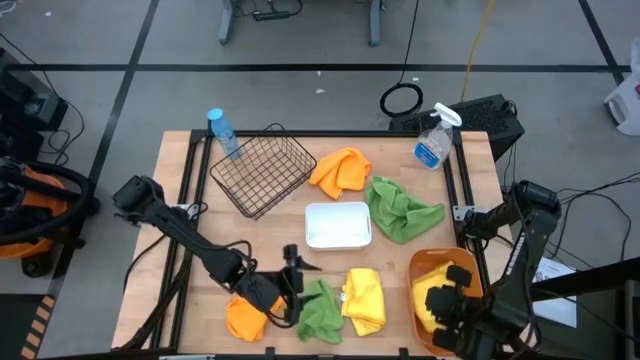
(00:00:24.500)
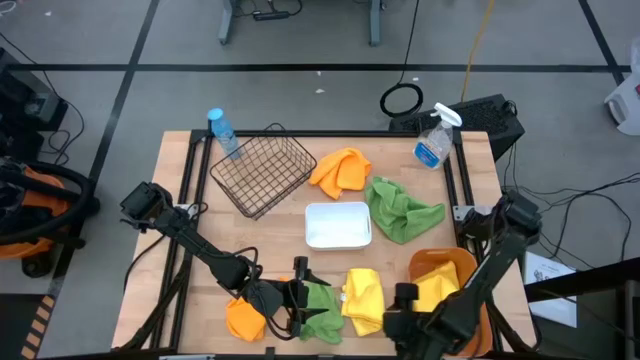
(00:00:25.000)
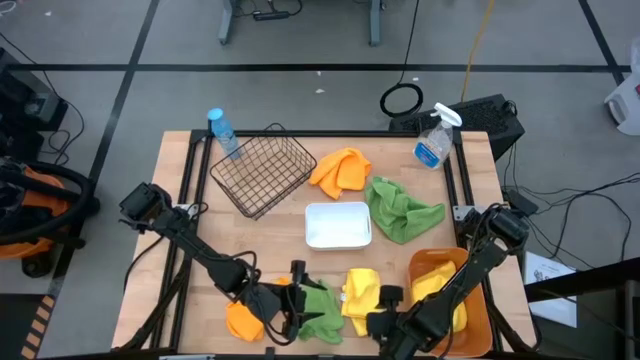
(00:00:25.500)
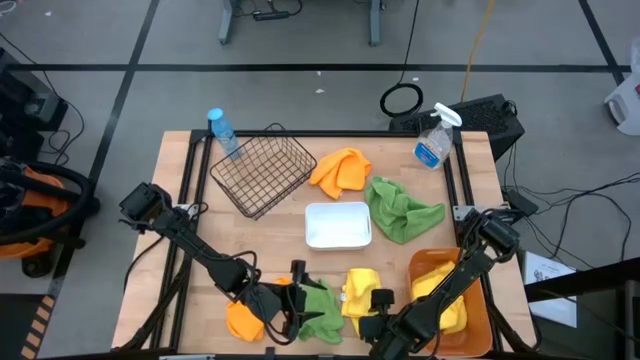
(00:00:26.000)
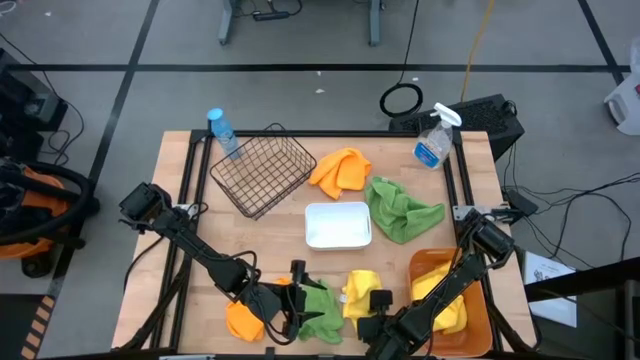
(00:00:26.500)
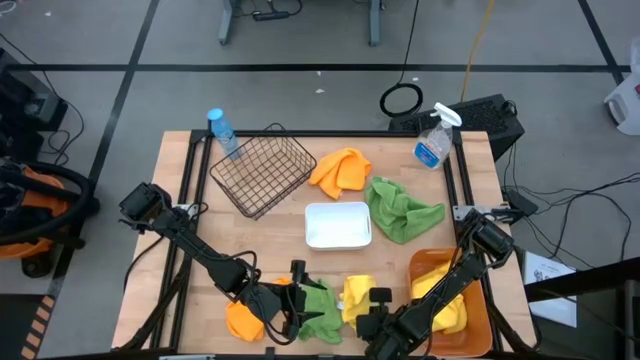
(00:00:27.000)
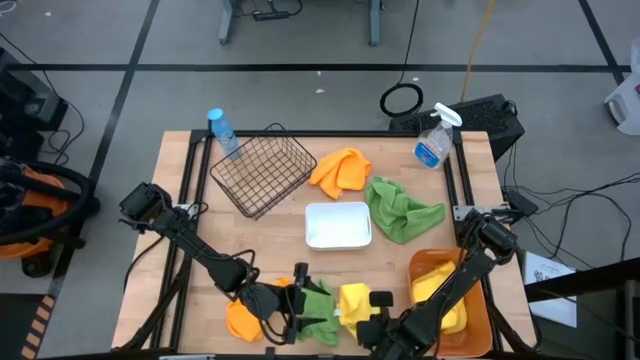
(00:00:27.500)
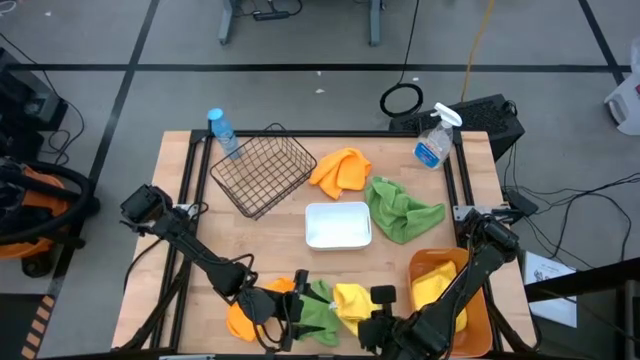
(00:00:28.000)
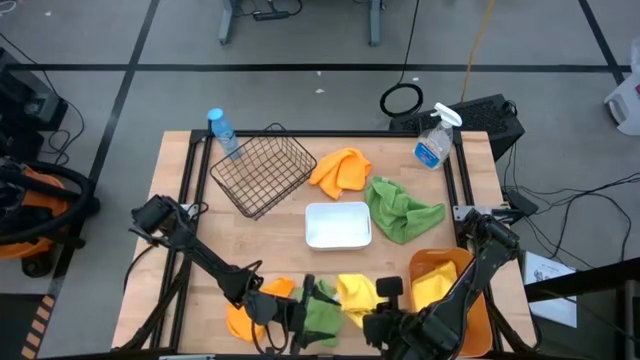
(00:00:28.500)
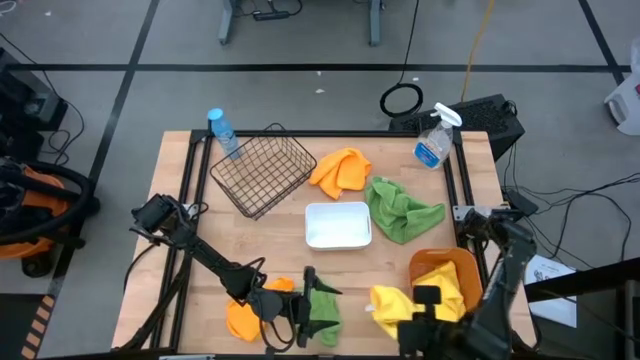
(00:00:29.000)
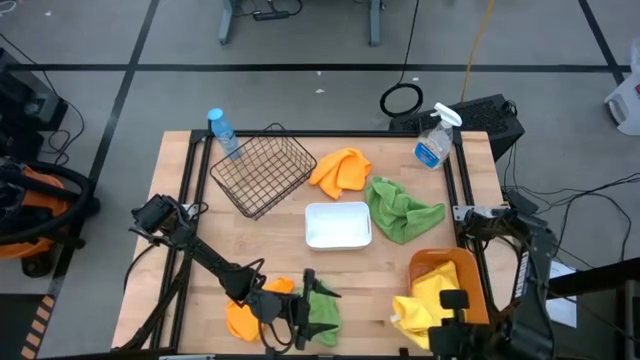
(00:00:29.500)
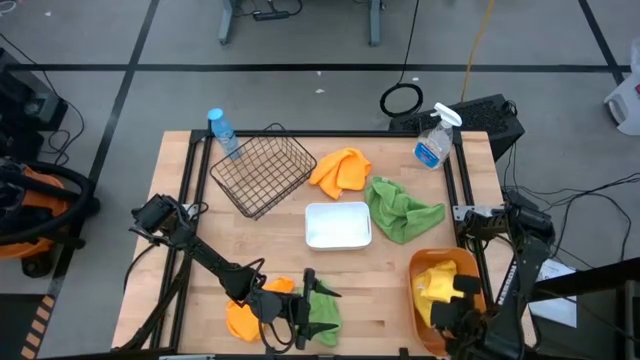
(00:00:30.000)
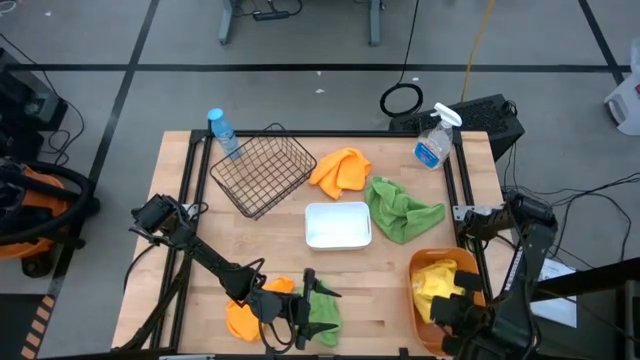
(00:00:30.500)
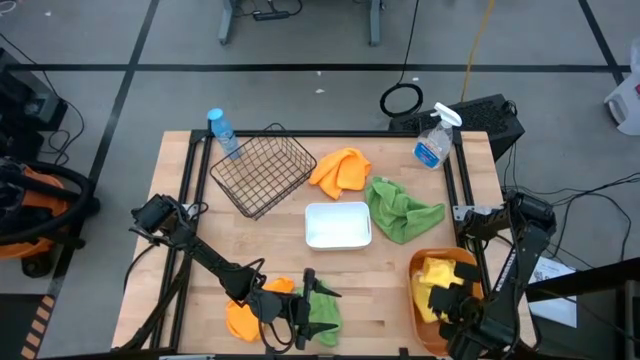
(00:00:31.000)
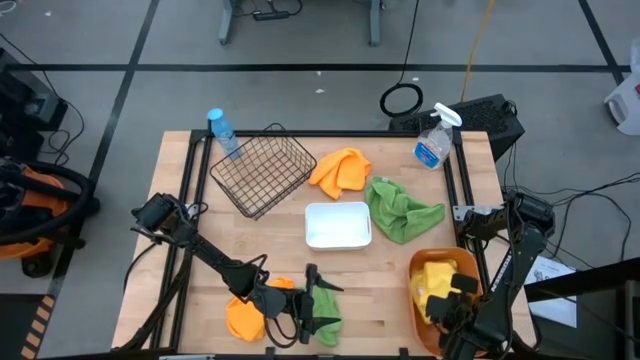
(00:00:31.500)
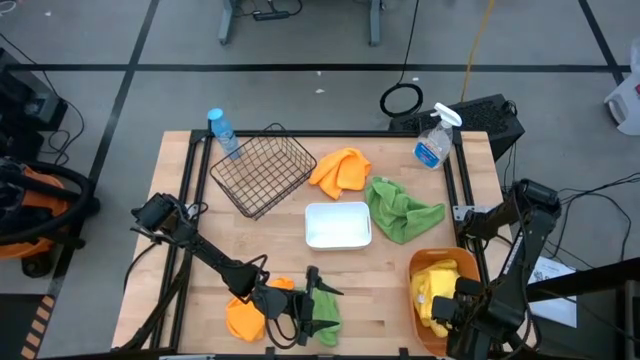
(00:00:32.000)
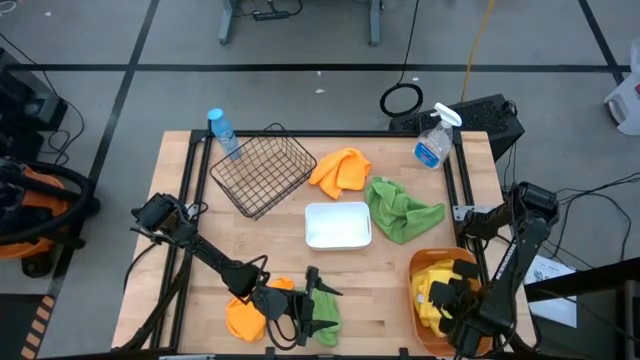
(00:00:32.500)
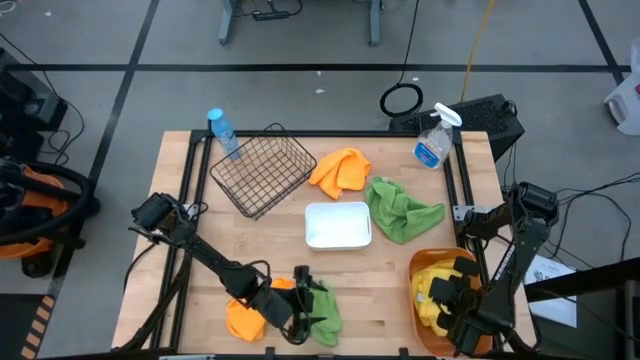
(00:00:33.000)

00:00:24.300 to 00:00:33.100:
Task: Sort microfiber towel by color & place in baskets
Put the yellow microfiber towel into the orange bin

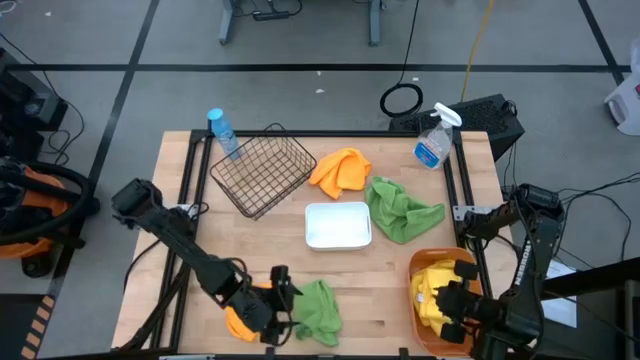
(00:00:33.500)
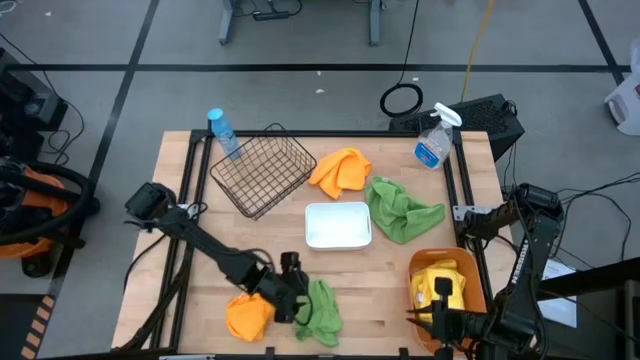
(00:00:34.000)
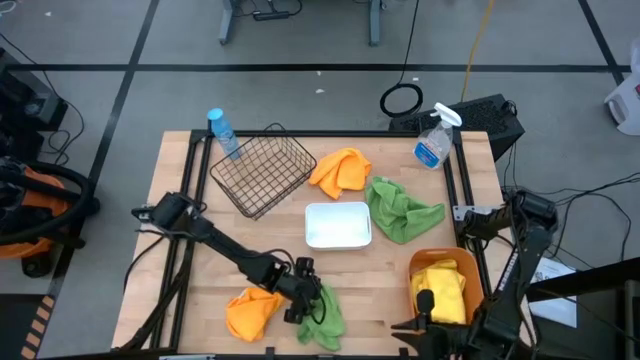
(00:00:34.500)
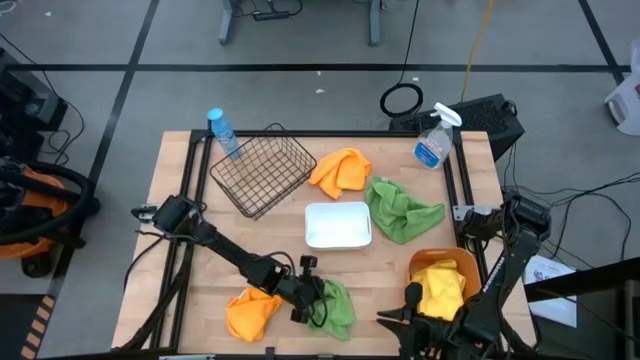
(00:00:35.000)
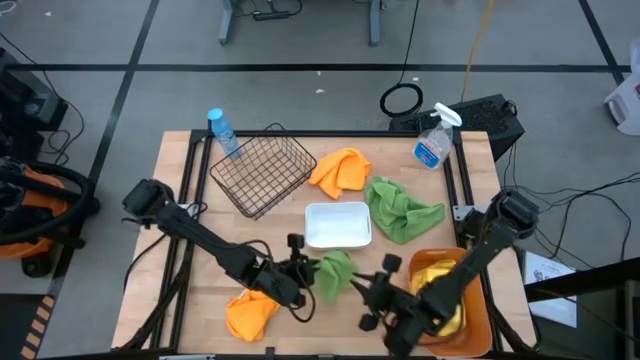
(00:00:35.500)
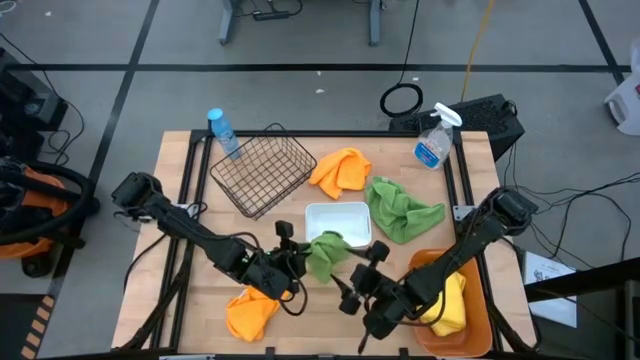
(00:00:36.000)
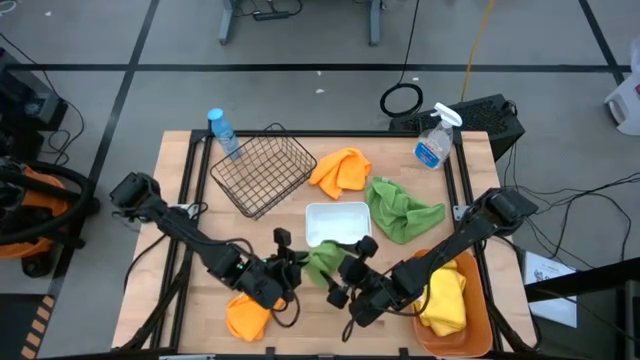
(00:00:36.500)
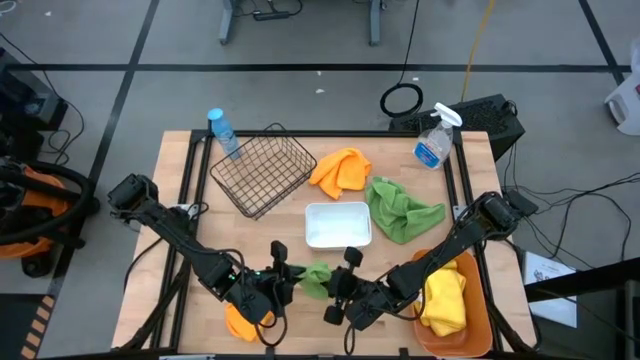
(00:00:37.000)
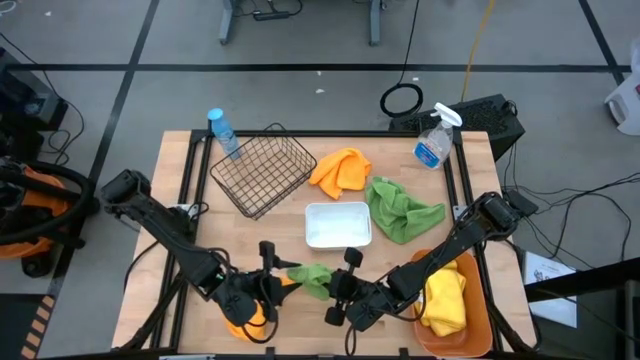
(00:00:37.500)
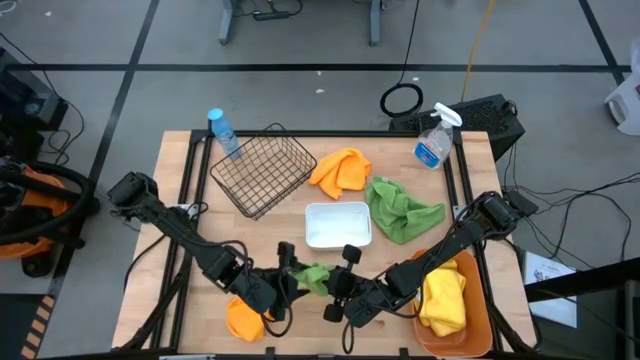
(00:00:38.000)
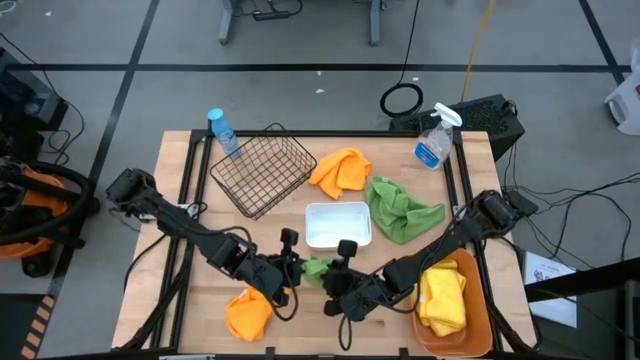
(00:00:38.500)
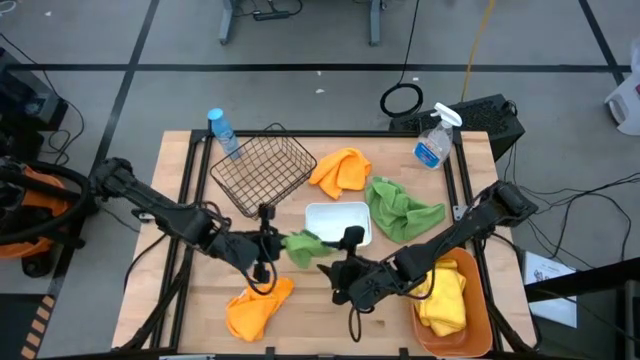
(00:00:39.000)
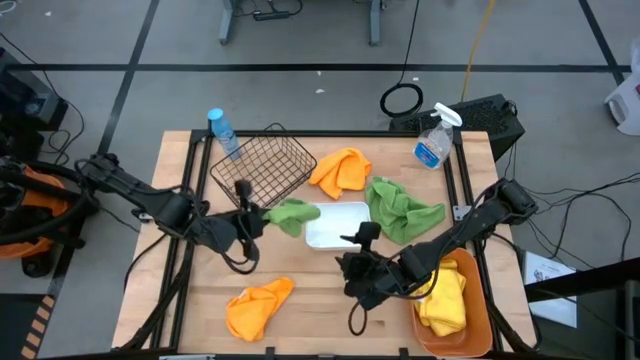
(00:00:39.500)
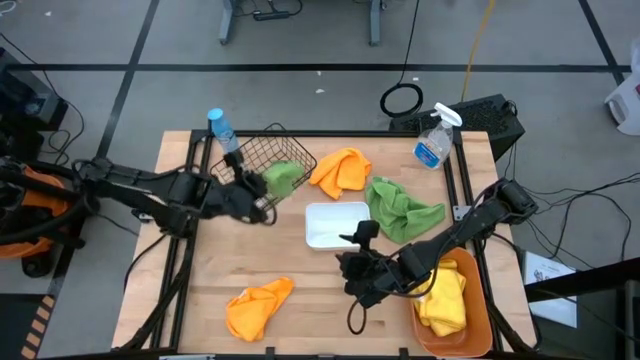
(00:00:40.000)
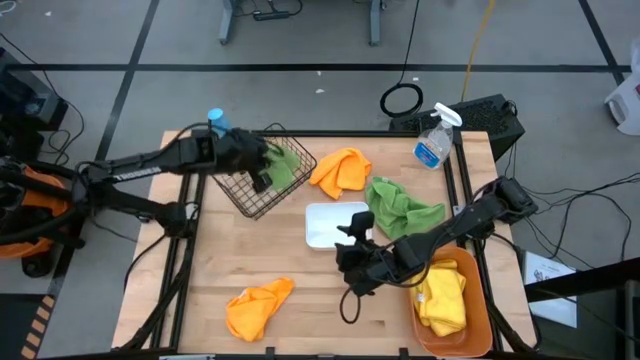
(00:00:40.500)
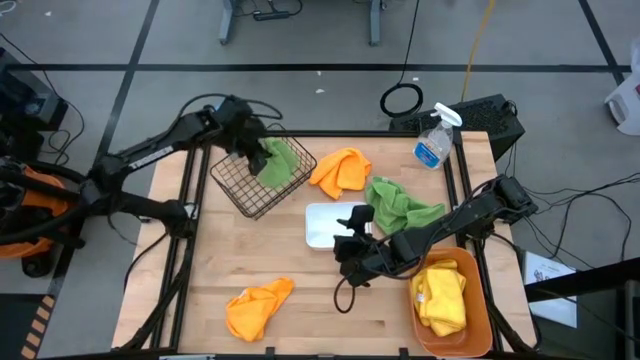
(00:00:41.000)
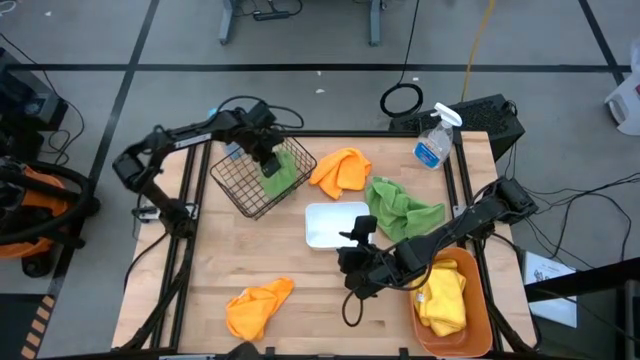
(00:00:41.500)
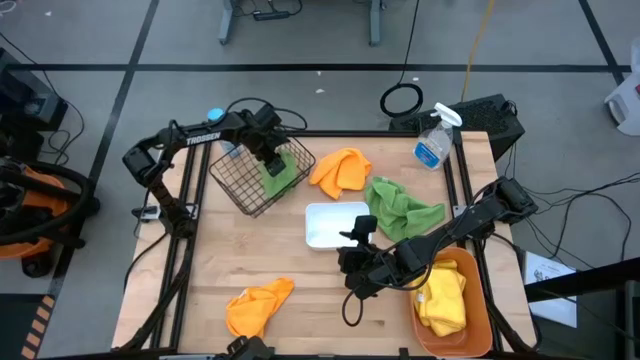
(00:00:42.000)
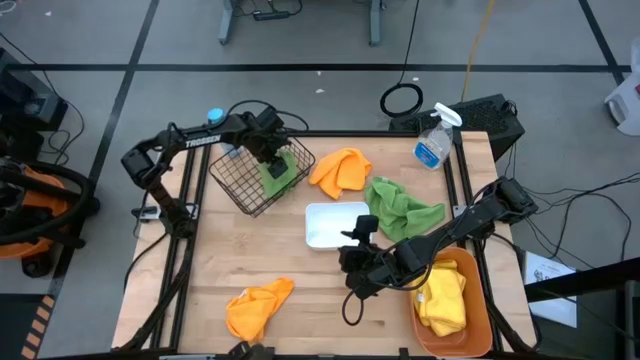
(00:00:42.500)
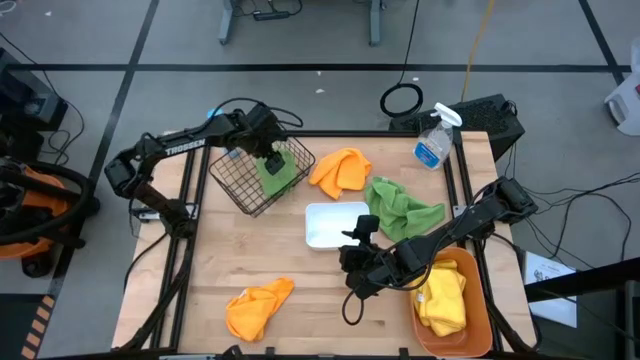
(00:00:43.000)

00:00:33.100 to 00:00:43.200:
Put the bottom green microfiber towel into the black wire basket
